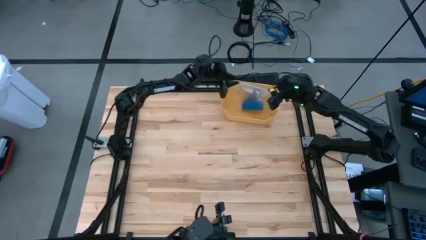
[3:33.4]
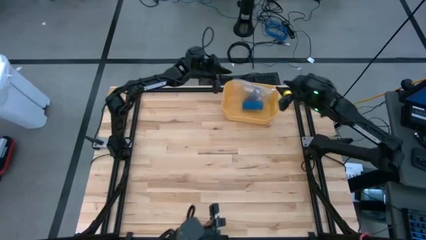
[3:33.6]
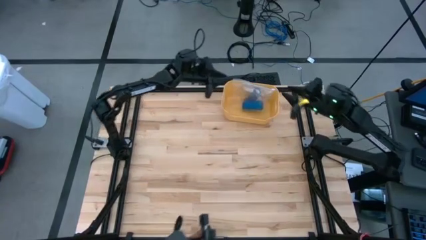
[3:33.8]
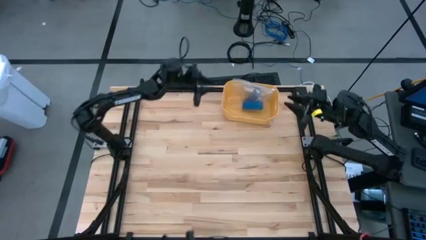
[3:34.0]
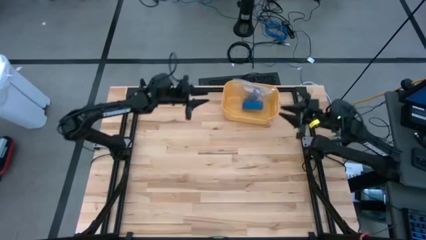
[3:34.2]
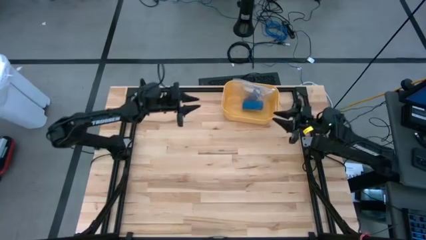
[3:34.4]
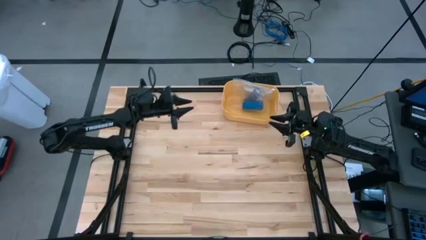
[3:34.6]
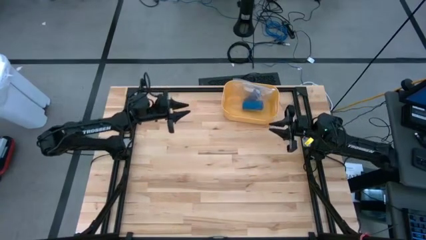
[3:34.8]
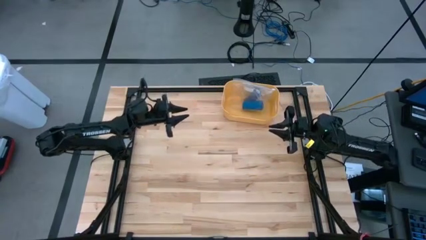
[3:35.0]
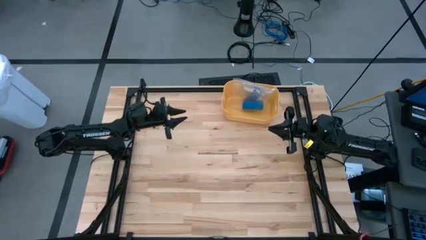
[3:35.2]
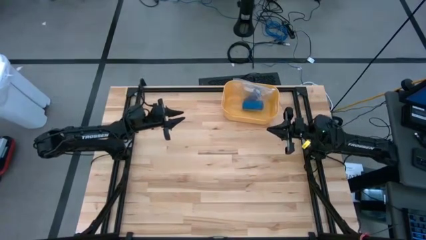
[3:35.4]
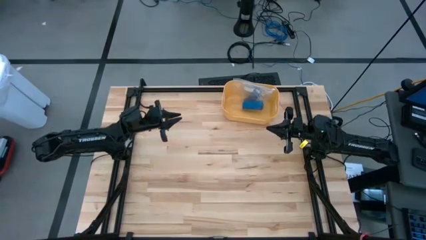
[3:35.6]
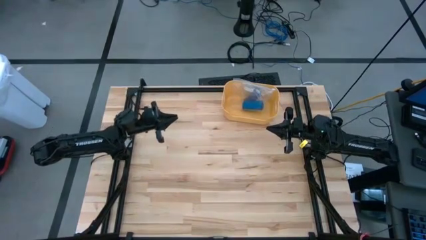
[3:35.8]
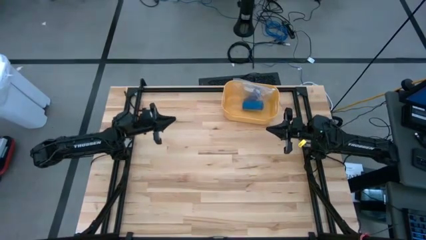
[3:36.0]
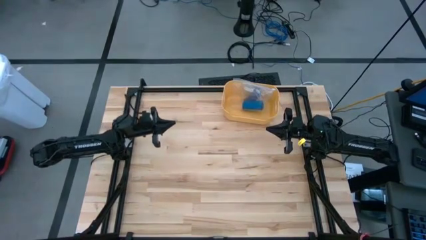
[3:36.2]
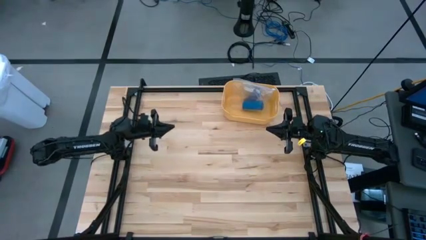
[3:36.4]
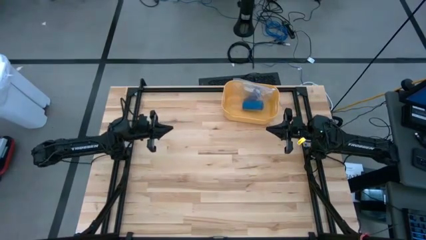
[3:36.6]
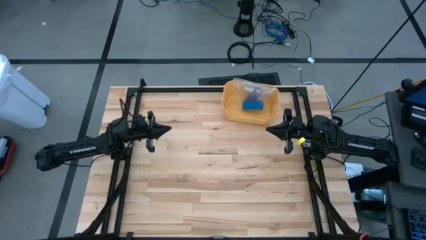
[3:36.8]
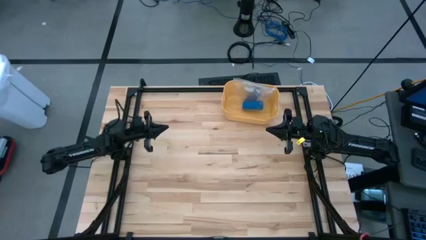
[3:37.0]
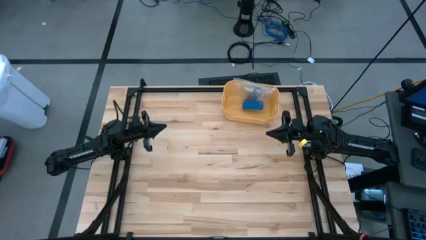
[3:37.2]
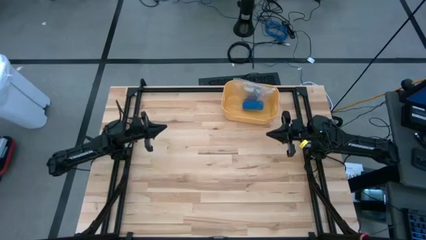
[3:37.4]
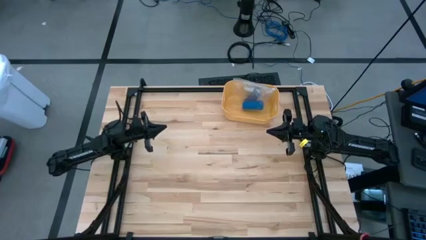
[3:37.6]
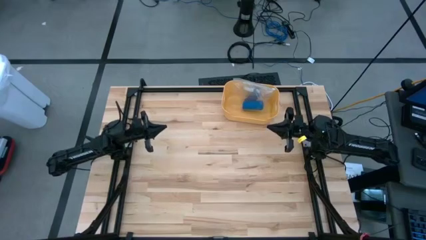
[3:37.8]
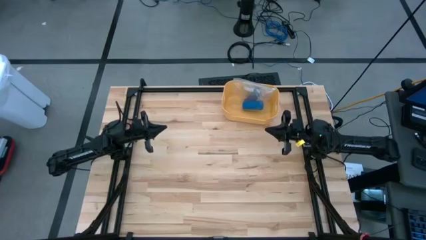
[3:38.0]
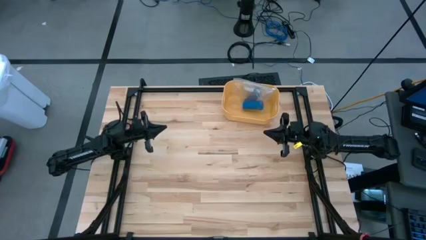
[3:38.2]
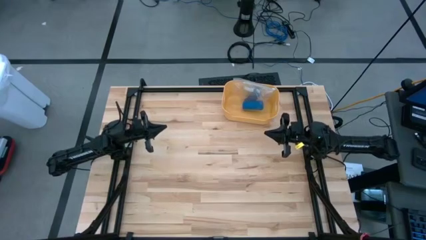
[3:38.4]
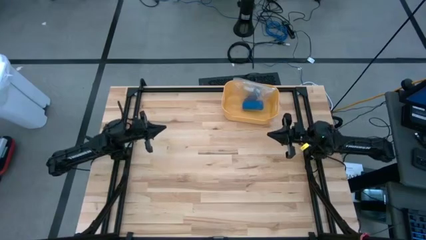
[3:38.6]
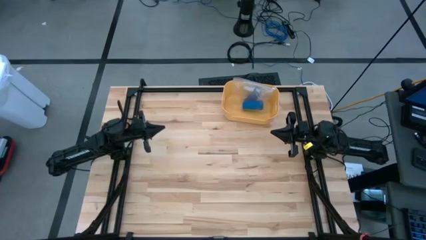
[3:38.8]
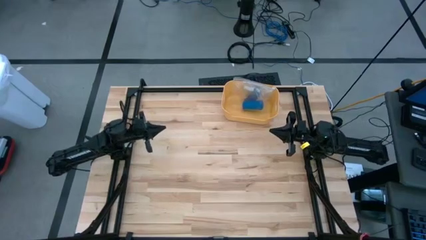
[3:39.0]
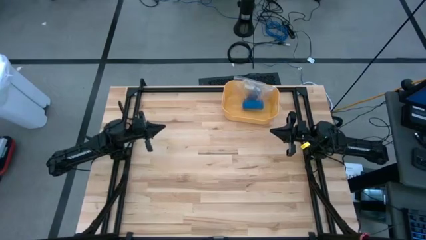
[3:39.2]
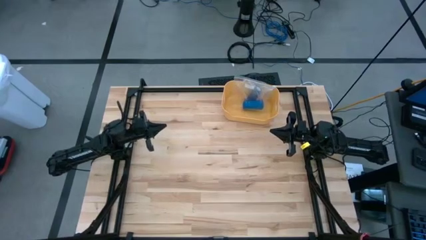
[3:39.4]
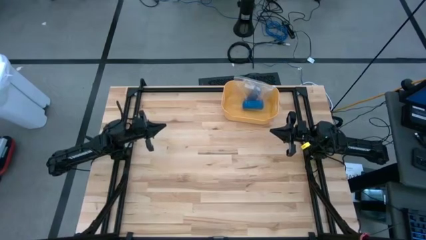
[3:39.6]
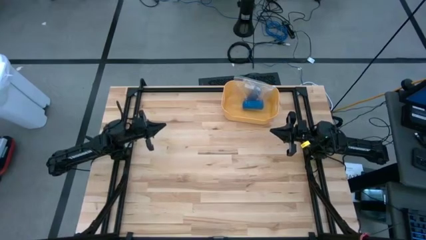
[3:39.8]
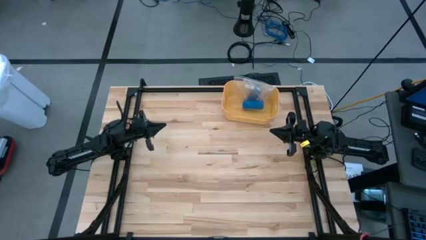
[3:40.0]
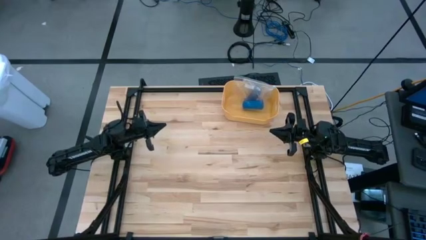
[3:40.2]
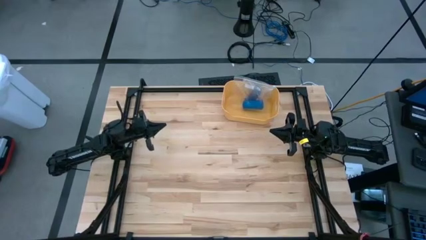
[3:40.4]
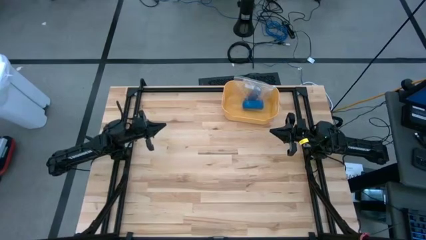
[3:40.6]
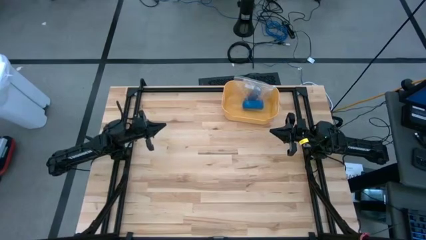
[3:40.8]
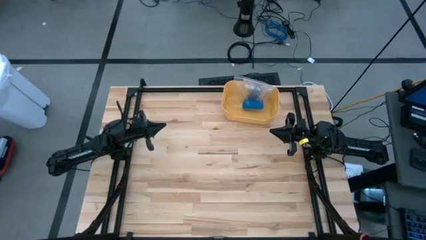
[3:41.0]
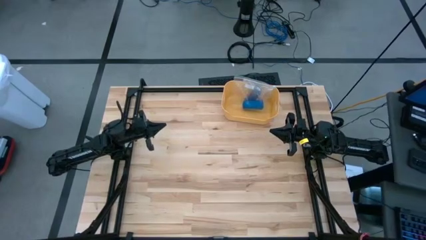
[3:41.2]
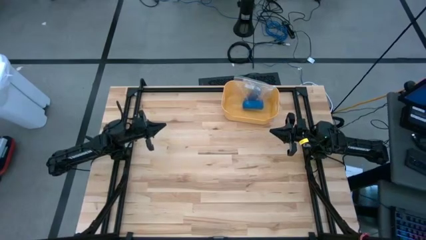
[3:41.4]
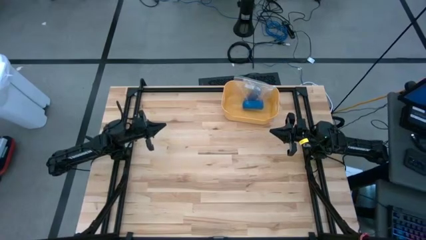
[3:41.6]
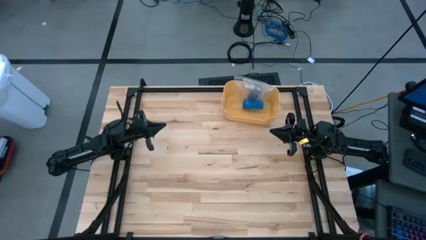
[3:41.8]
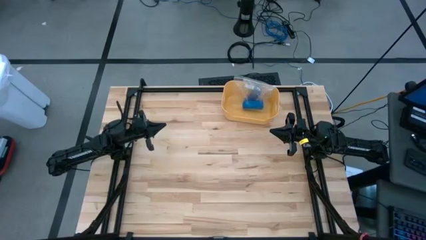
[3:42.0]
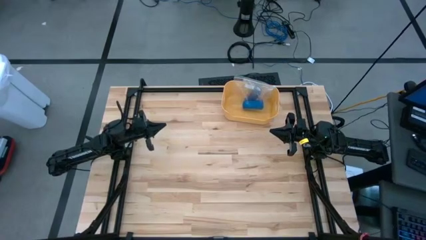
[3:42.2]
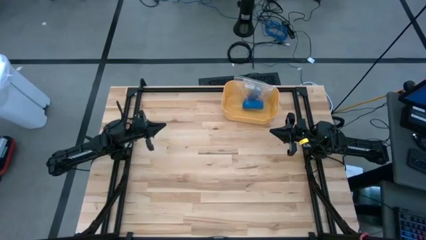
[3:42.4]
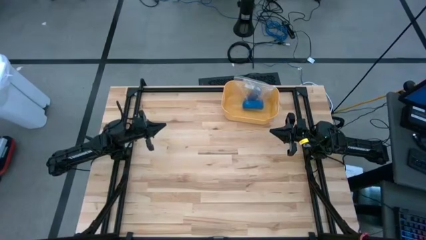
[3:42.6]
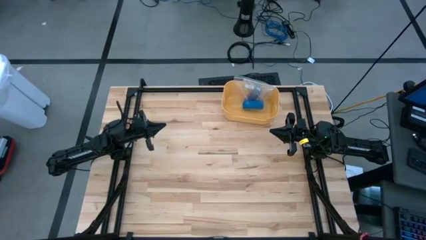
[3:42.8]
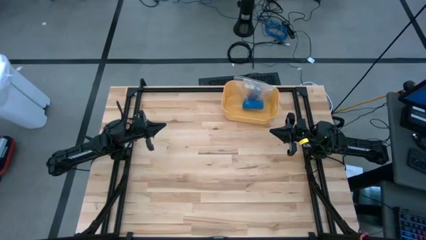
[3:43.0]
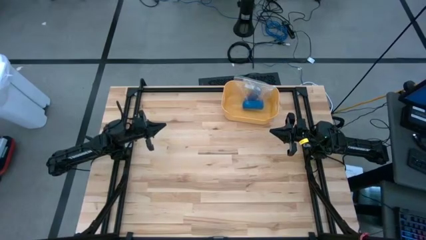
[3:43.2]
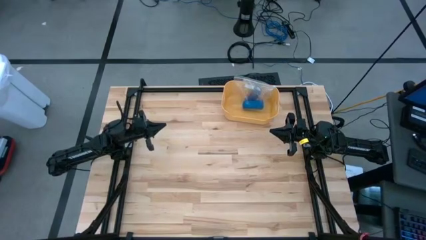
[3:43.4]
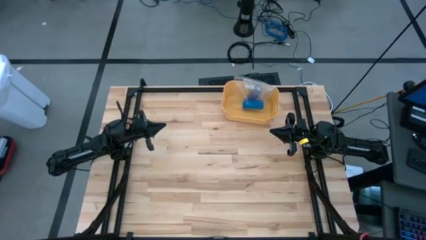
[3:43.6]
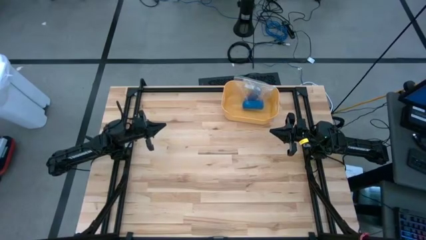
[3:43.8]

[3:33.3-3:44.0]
Task: Roll bandage
Return to Home Position

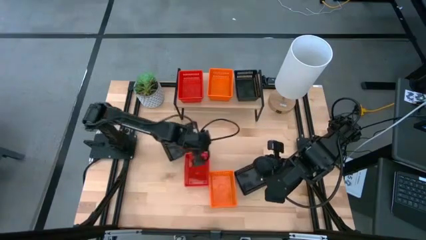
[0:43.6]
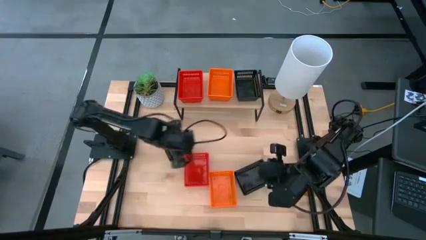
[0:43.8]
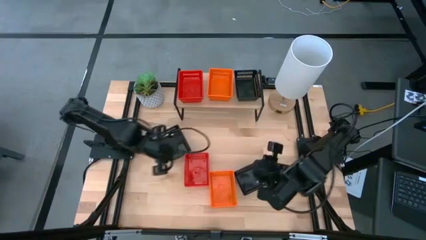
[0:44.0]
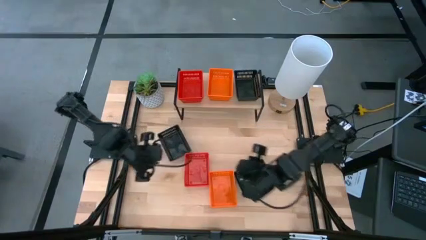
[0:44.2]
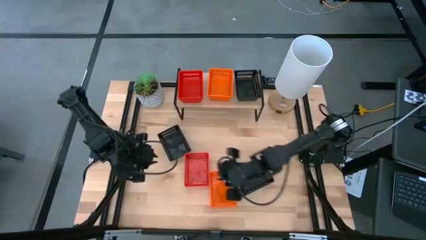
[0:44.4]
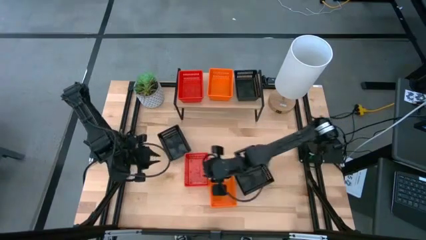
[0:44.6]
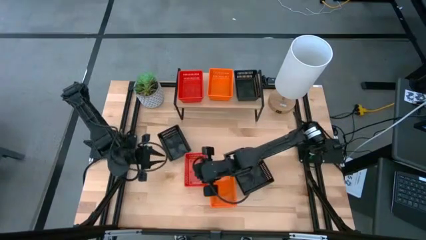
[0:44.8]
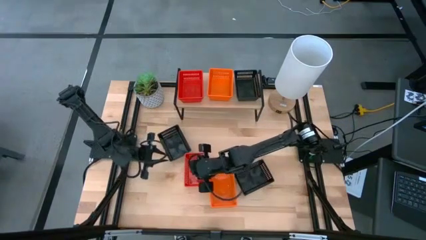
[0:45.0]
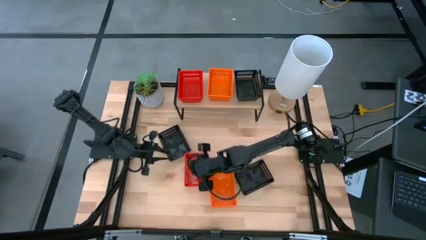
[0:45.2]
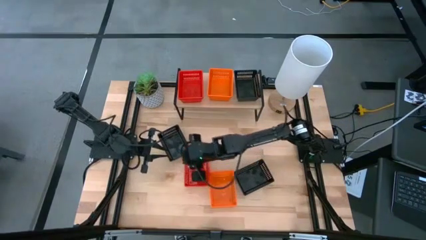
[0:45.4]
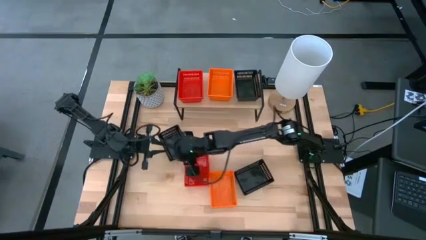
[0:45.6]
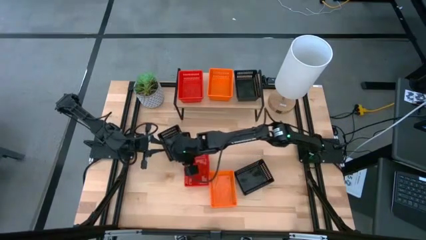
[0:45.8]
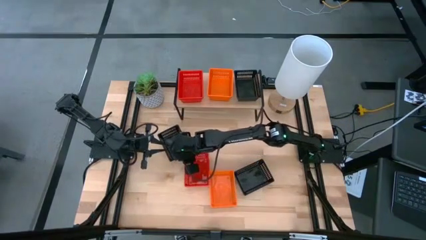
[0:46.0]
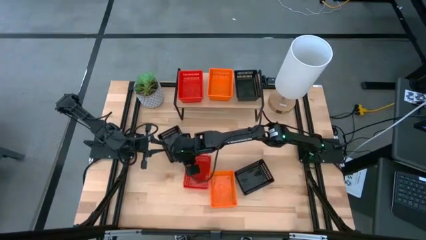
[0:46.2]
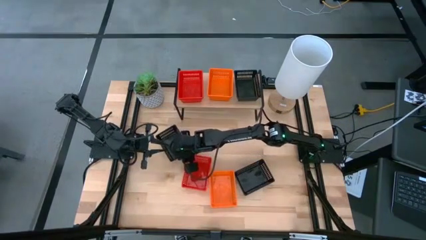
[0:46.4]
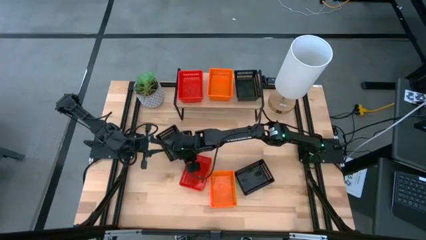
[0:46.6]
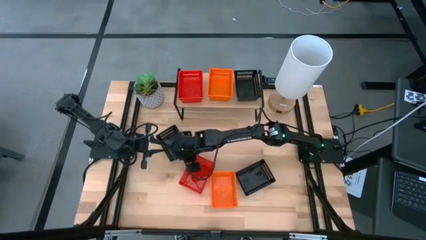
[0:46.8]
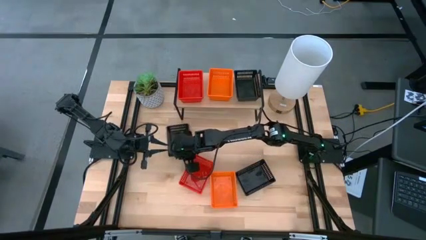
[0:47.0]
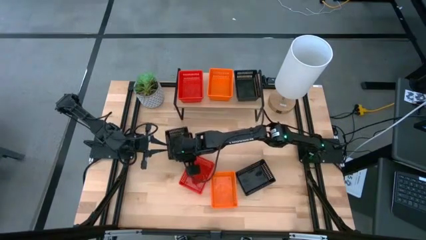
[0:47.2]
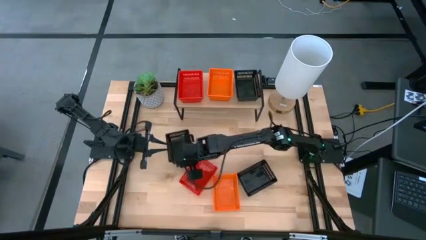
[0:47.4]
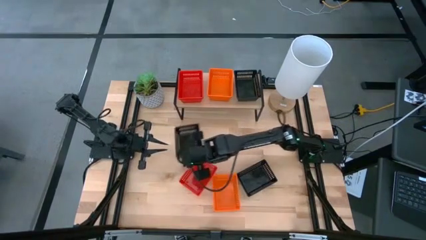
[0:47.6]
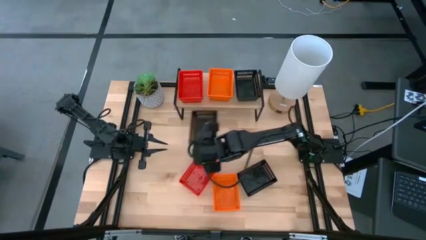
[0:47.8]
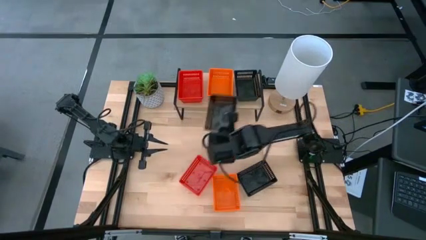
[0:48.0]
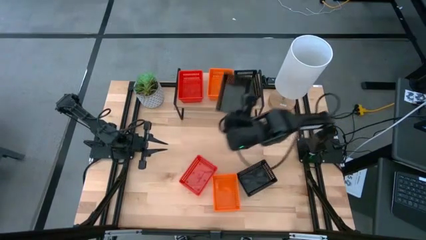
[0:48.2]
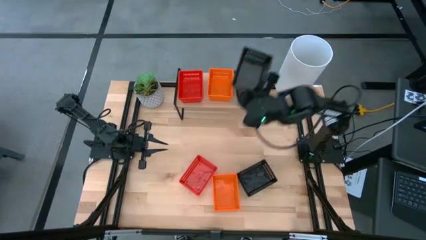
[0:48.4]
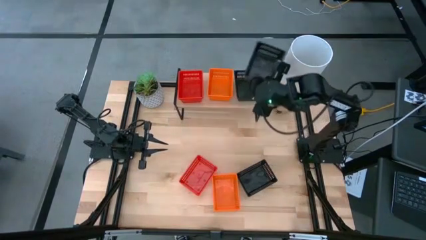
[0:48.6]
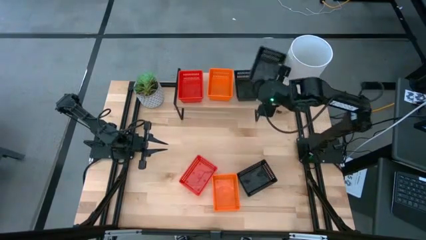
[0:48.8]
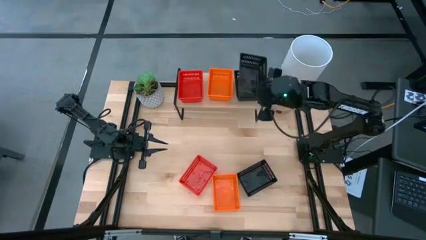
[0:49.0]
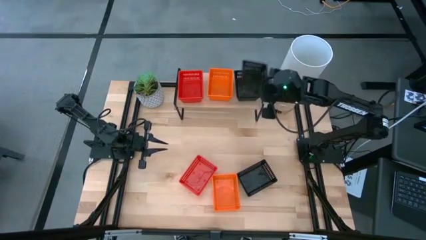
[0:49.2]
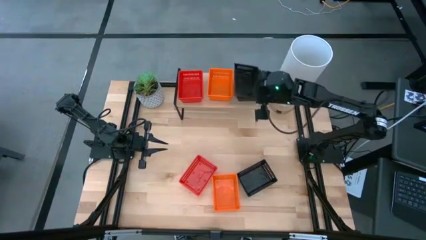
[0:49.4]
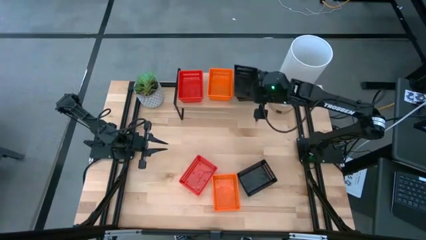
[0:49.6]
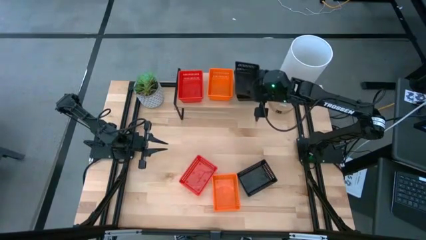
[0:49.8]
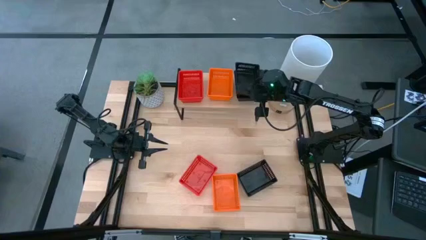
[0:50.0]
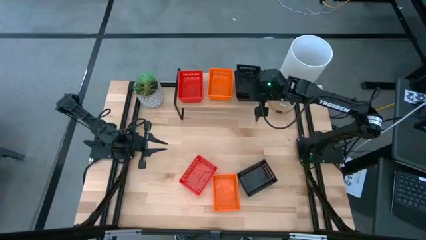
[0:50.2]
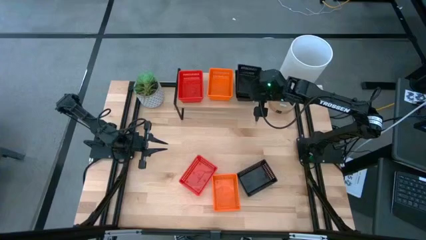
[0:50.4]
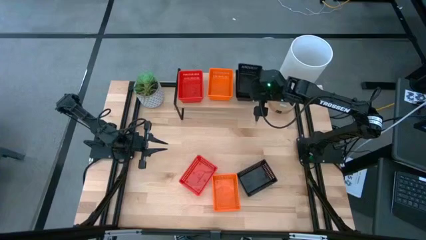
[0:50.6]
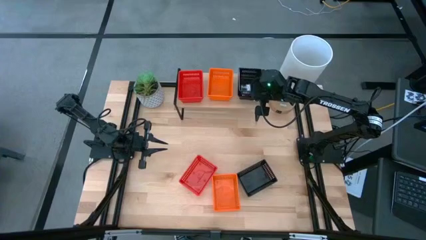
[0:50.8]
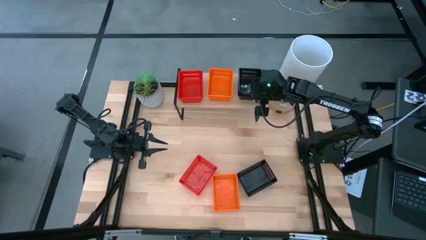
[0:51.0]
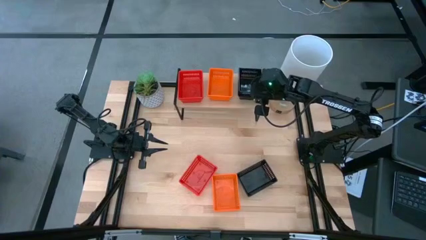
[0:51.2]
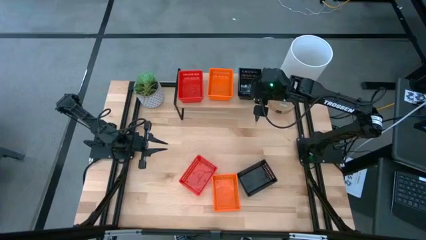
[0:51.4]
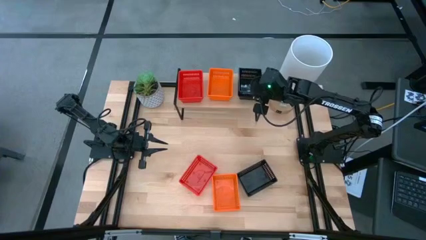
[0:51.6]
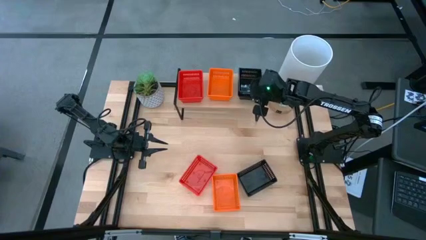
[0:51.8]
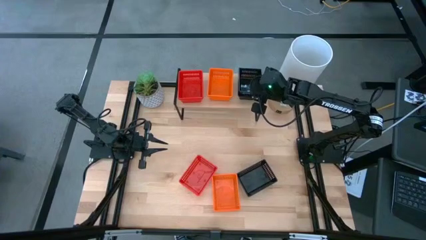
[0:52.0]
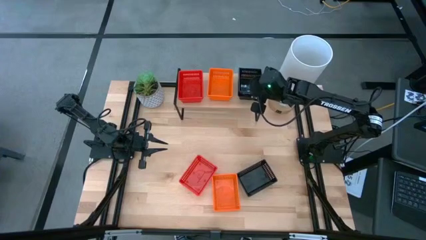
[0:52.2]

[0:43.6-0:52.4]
Task: Stack baskets on shelf by color
Stack the left black basket on the black basket
